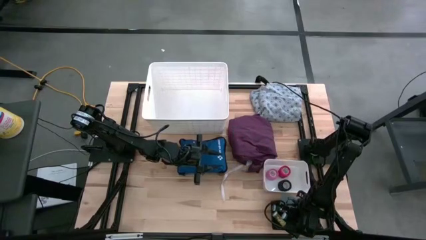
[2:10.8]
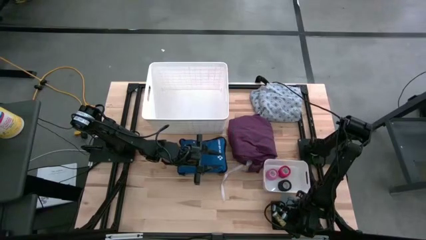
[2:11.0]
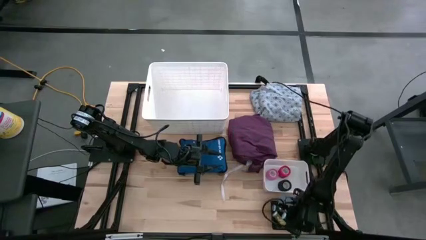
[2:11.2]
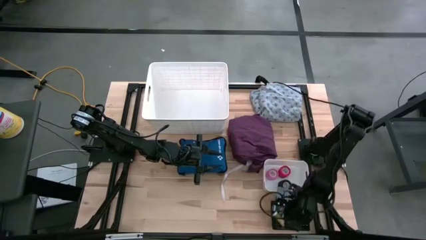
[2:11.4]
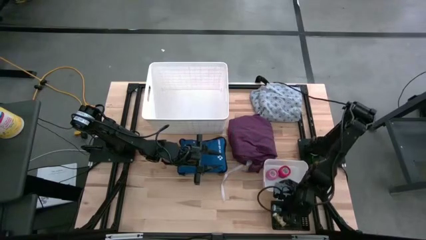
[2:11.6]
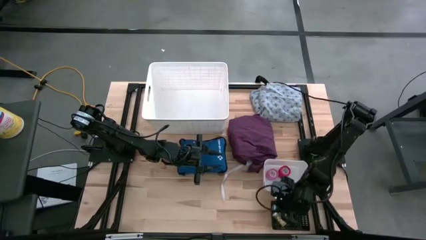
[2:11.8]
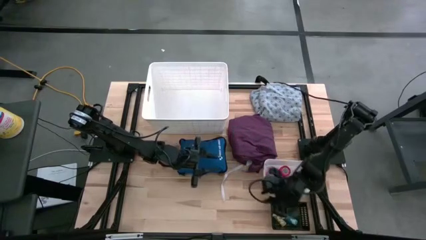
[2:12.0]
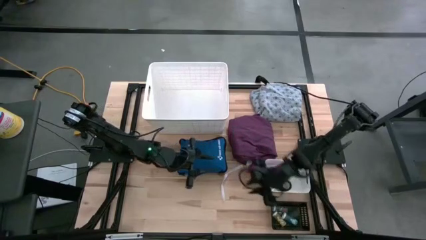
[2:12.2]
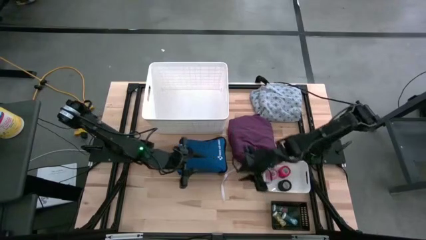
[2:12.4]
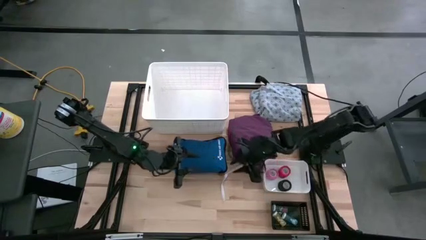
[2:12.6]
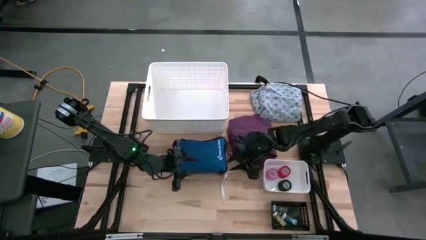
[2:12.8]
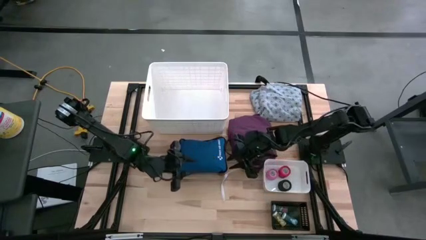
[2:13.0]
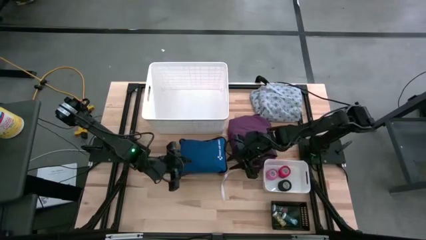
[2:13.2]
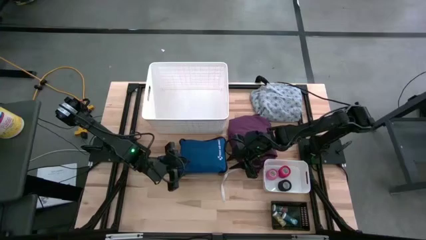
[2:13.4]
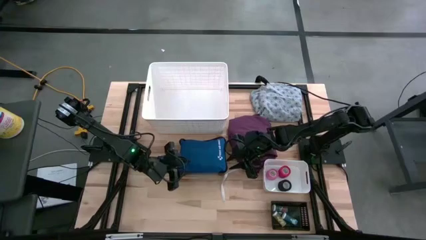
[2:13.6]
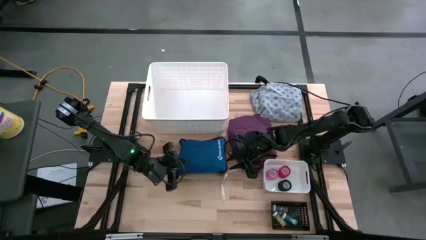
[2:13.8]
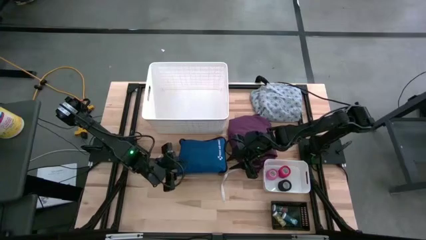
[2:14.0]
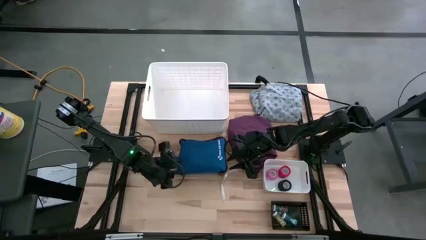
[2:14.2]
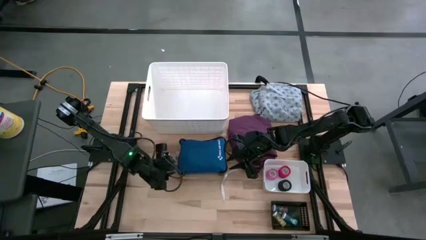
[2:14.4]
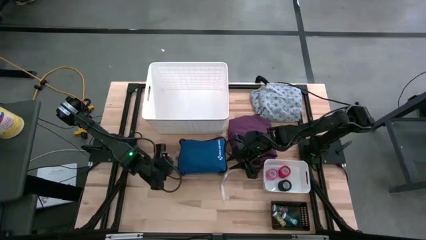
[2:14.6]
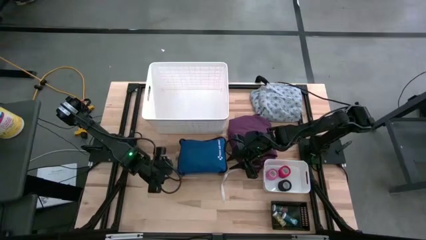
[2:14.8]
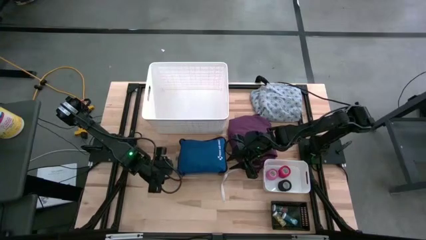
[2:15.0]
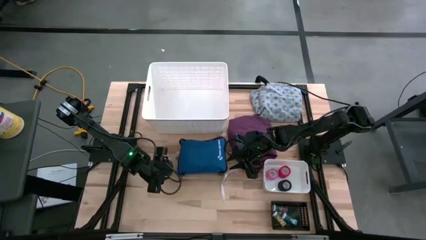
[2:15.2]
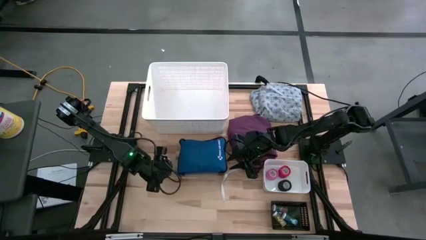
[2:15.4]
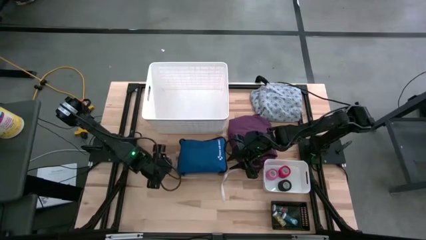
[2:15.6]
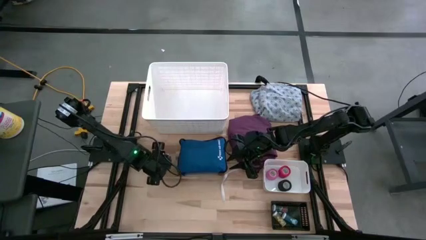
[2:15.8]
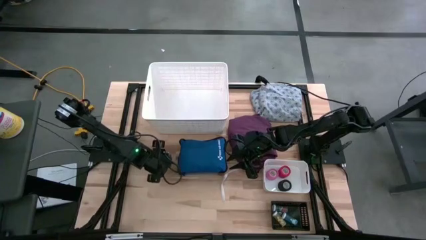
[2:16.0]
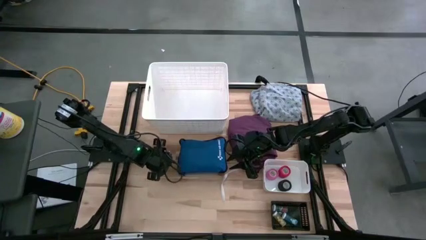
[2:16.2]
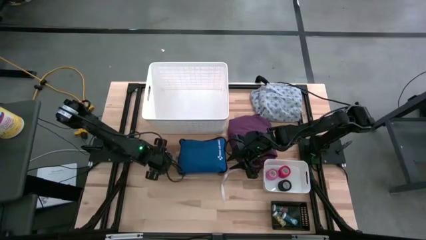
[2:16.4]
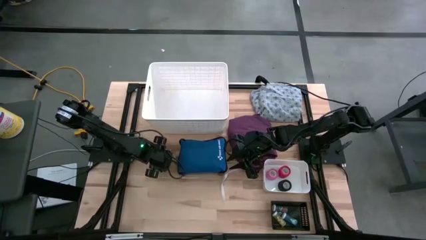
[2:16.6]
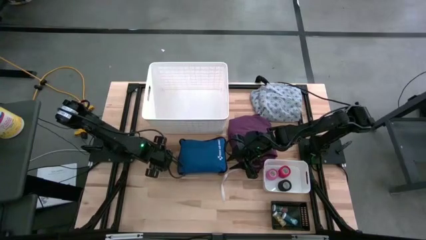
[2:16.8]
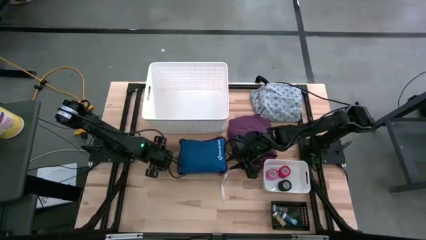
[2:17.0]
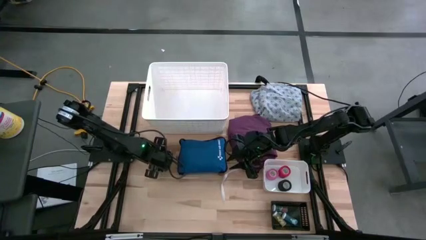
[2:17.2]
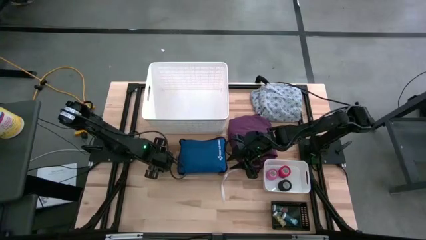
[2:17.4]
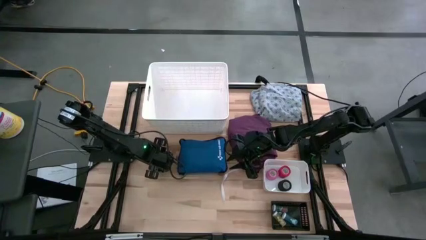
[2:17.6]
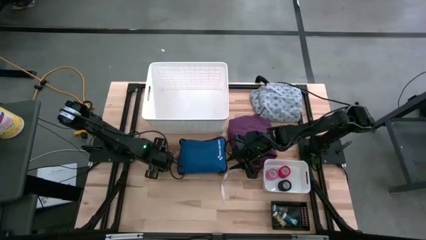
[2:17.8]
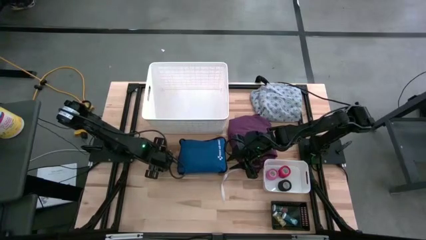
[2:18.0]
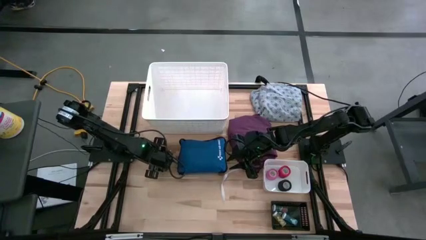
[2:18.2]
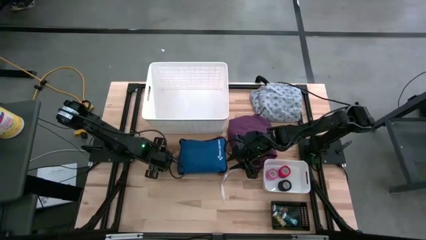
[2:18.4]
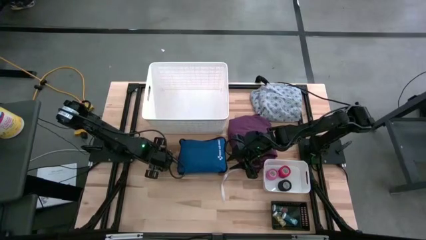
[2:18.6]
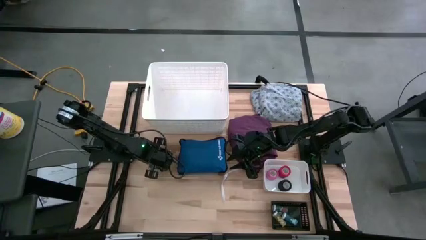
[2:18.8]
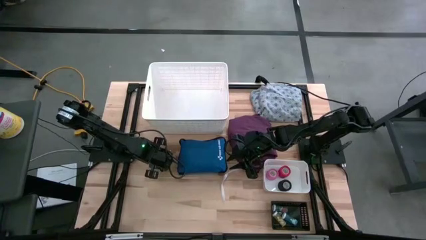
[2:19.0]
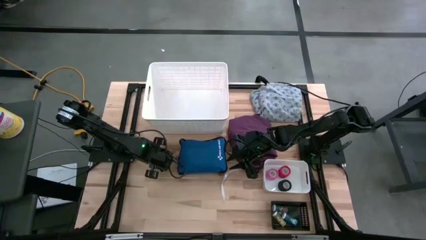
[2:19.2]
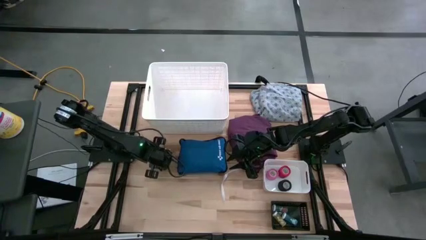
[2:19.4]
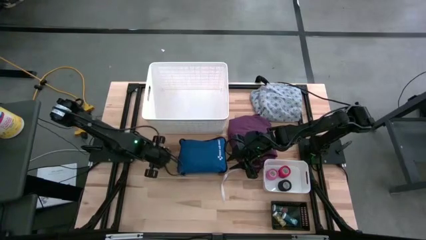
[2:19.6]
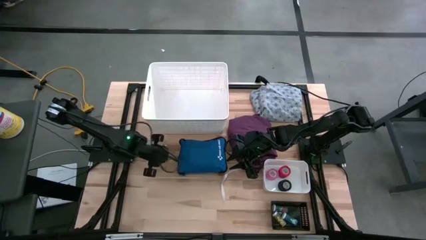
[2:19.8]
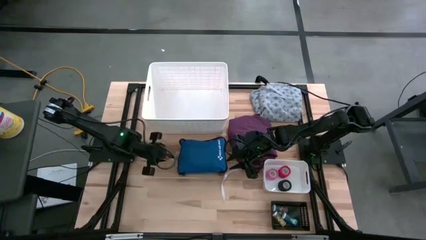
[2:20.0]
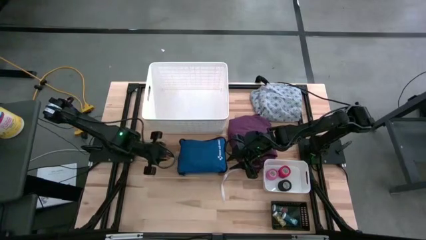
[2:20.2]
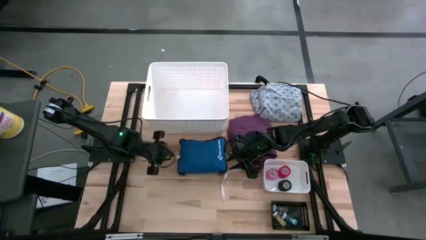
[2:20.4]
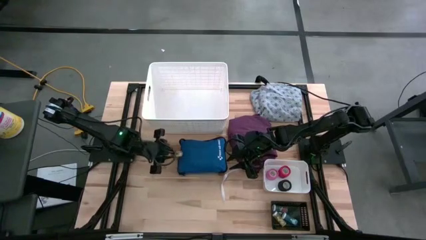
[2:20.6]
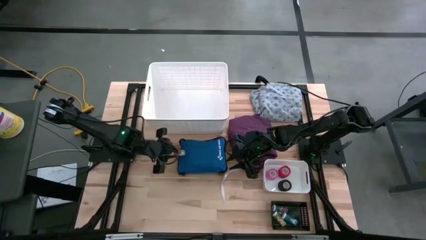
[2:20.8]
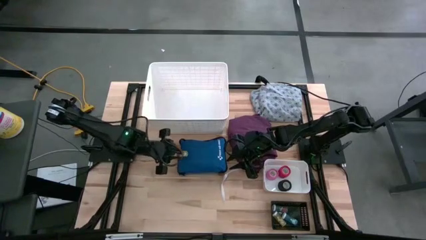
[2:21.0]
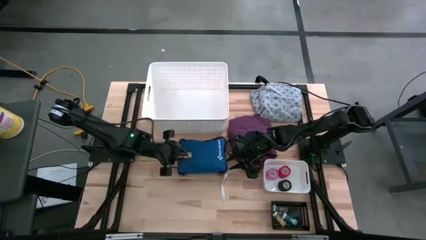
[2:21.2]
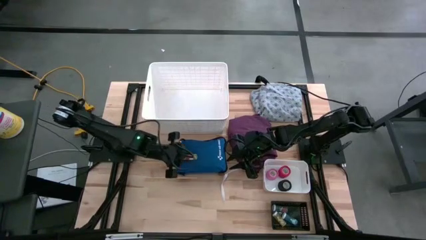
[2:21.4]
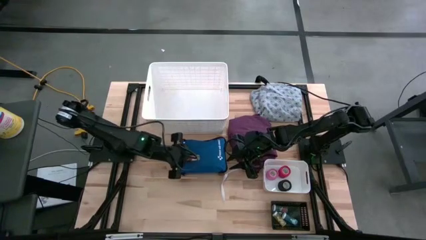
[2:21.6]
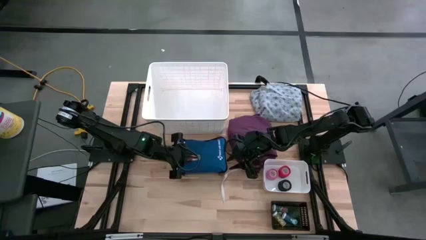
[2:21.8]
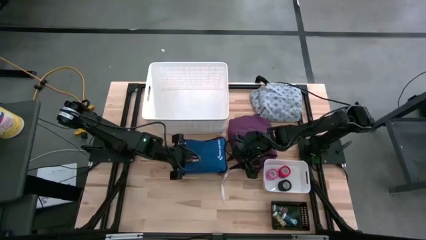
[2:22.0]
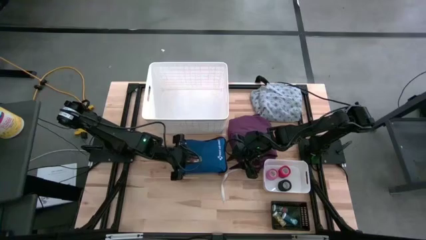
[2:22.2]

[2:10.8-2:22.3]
Task: Pick & Place Medicine items
Put the yellow pill bottle into the black bin

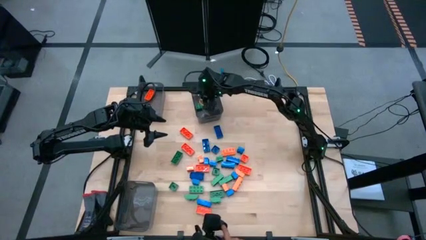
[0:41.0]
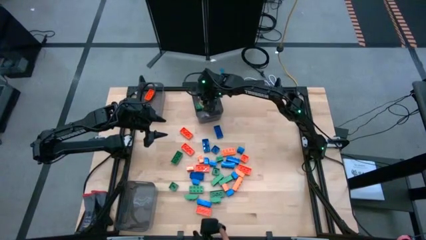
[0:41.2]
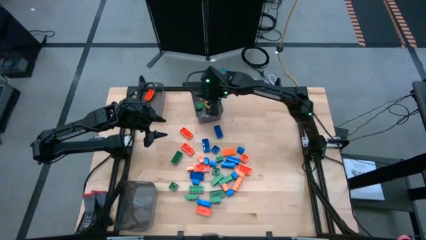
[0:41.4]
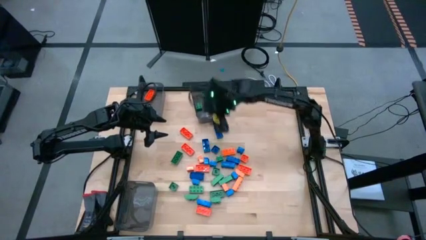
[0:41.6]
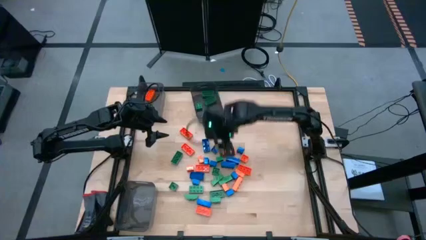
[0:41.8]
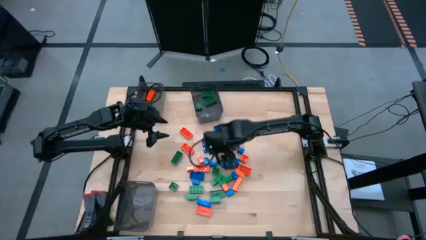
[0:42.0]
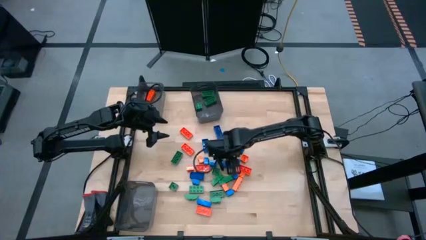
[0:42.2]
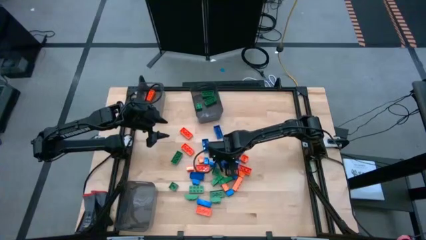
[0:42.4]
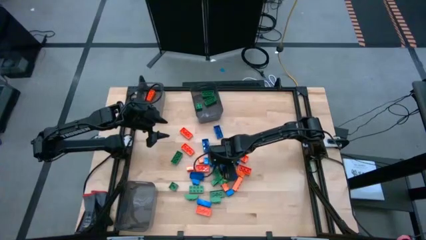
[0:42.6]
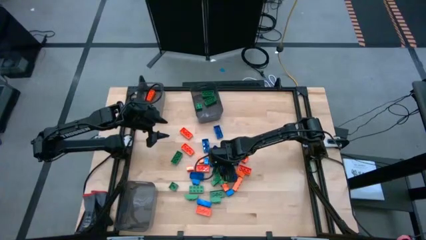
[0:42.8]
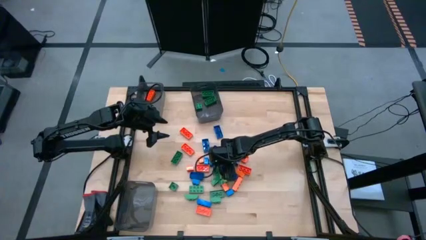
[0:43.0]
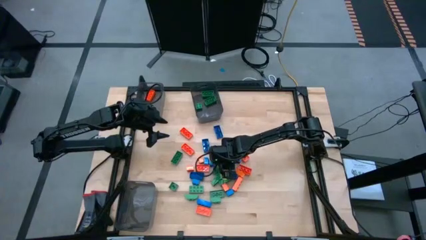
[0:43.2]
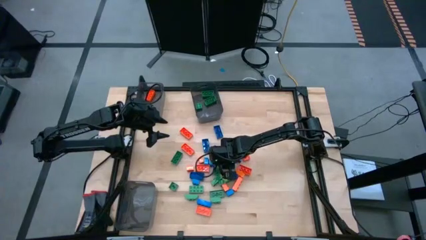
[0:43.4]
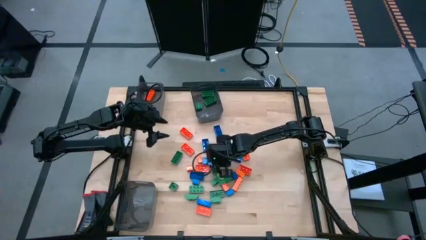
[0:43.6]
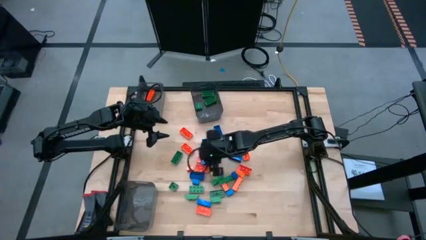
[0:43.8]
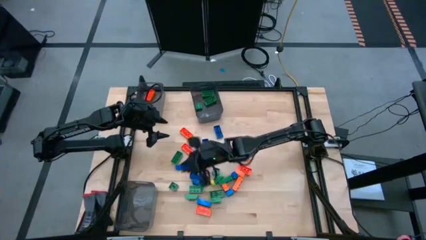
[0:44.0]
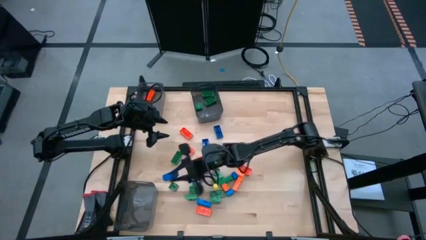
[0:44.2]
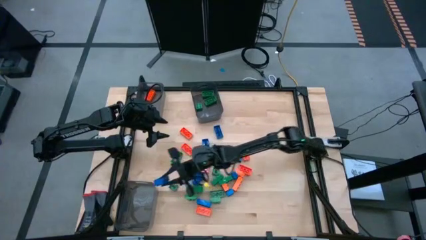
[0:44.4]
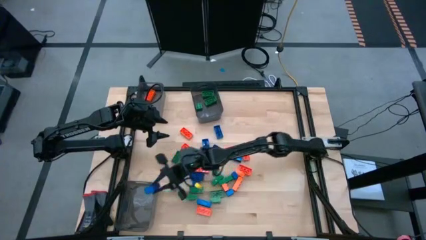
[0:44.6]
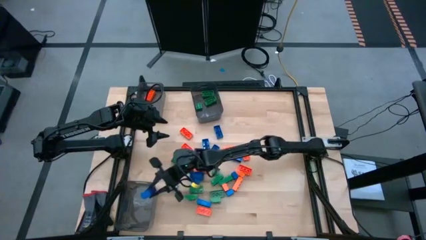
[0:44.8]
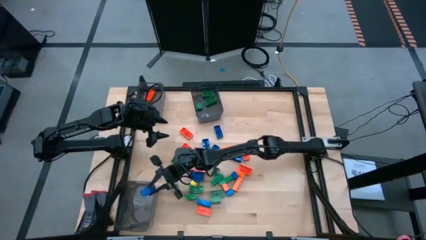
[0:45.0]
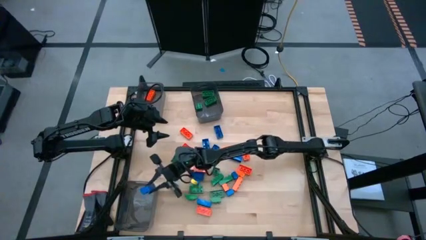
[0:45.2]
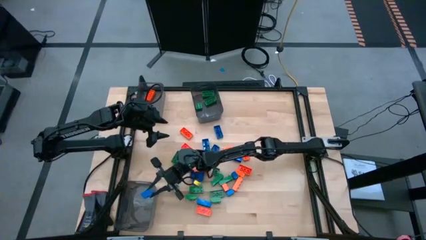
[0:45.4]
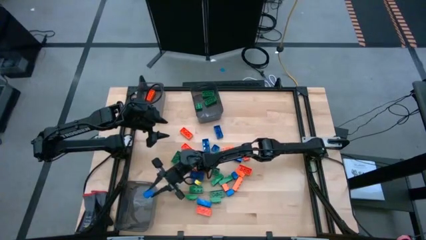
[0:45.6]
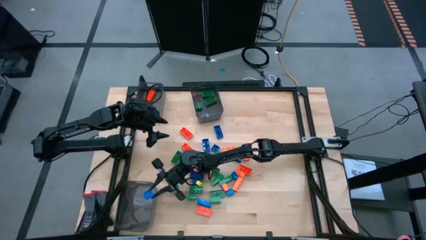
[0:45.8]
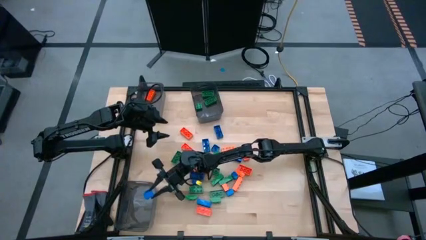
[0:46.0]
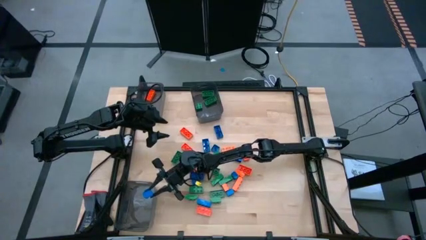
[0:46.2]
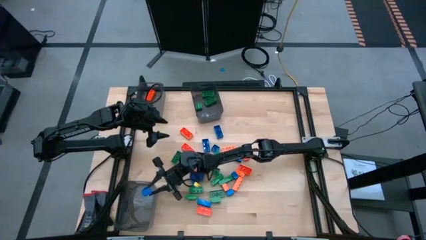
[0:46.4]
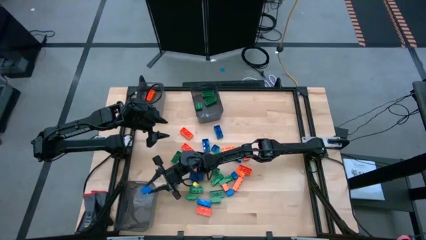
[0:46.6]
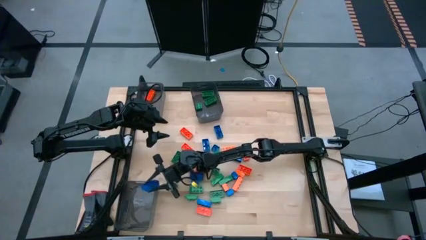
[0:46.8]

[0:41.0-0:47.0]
Task: Sort blocks
Put the blue game piece into the bottom left black transparent bin
